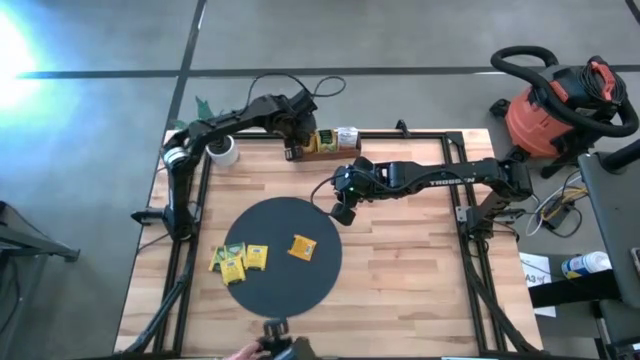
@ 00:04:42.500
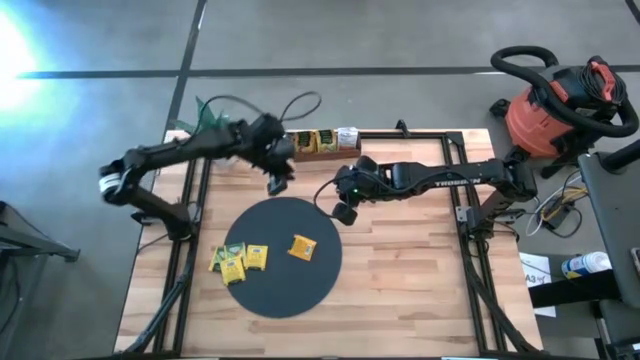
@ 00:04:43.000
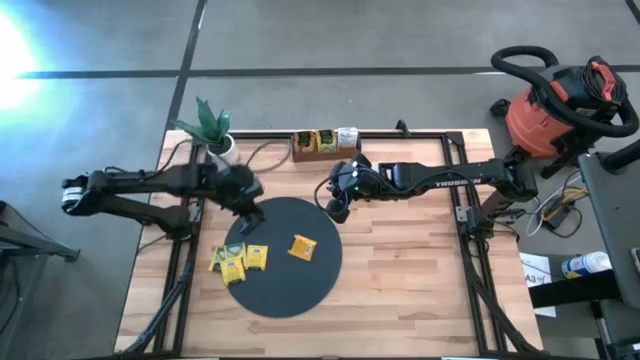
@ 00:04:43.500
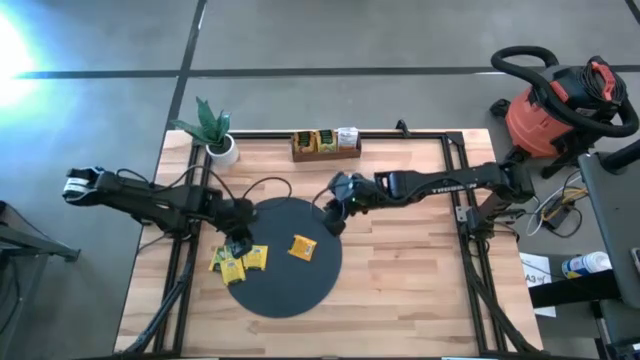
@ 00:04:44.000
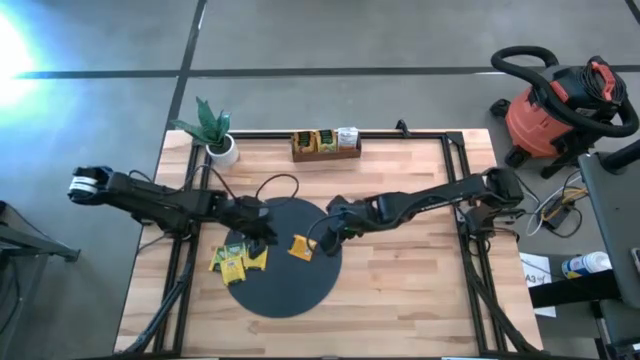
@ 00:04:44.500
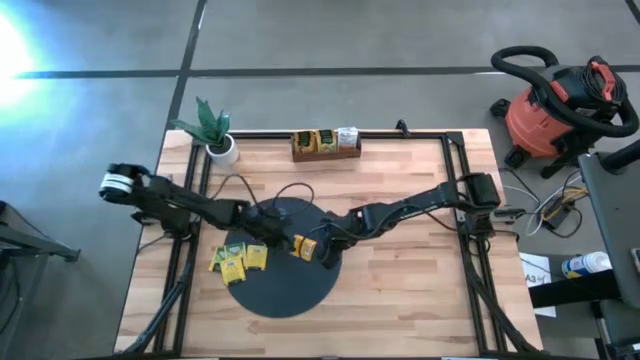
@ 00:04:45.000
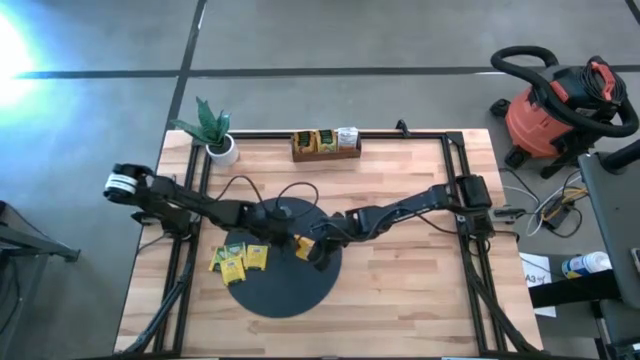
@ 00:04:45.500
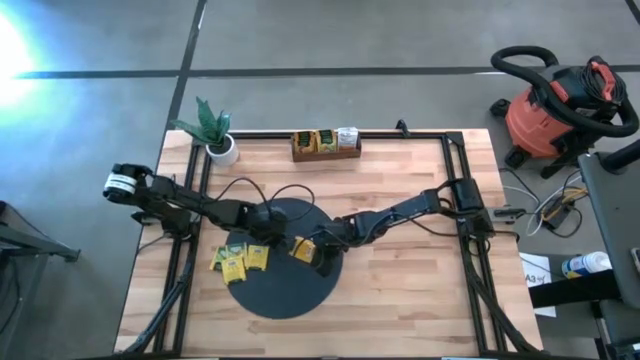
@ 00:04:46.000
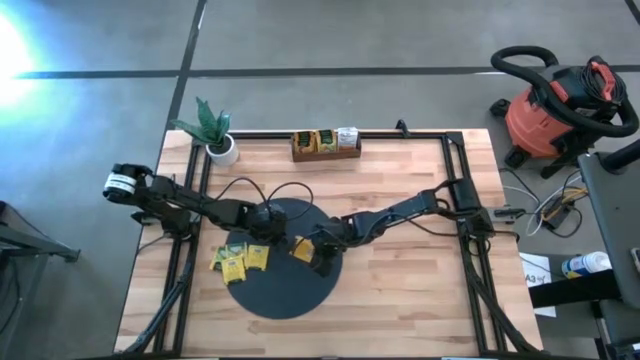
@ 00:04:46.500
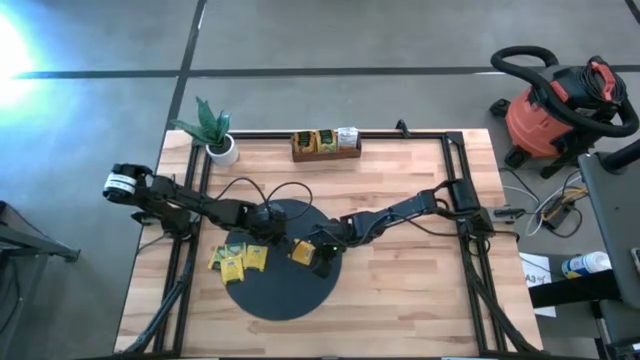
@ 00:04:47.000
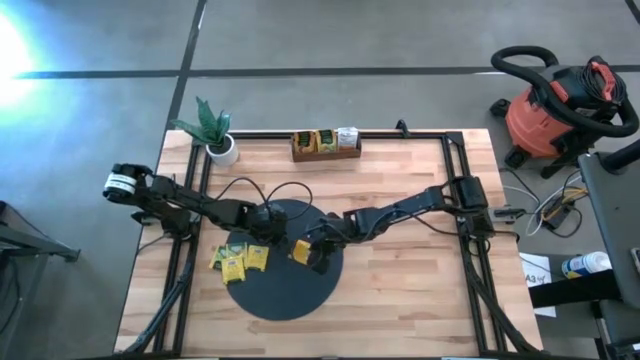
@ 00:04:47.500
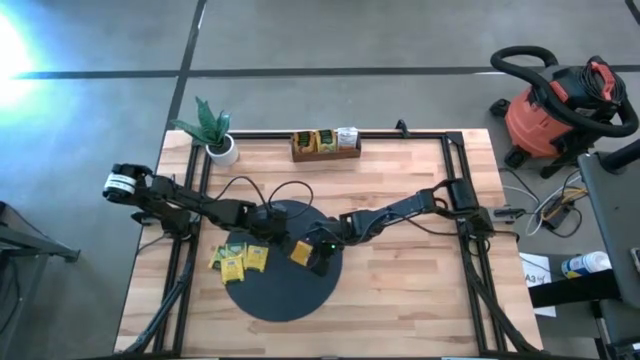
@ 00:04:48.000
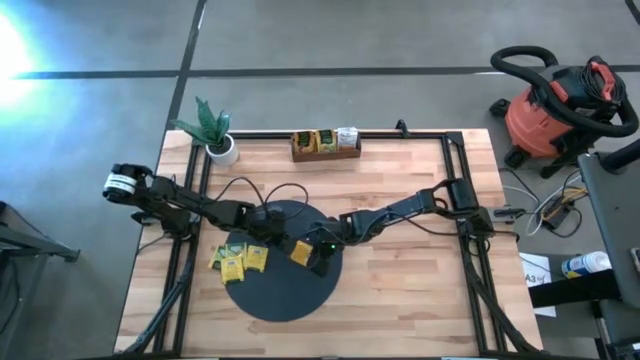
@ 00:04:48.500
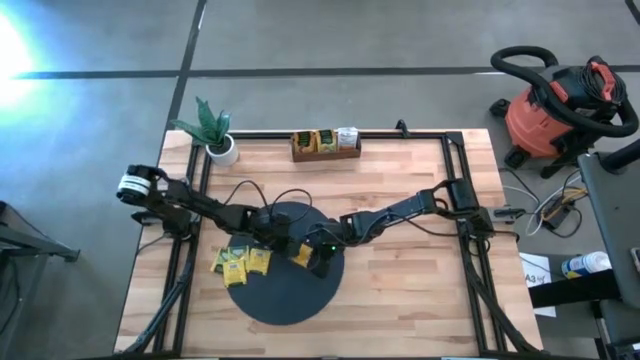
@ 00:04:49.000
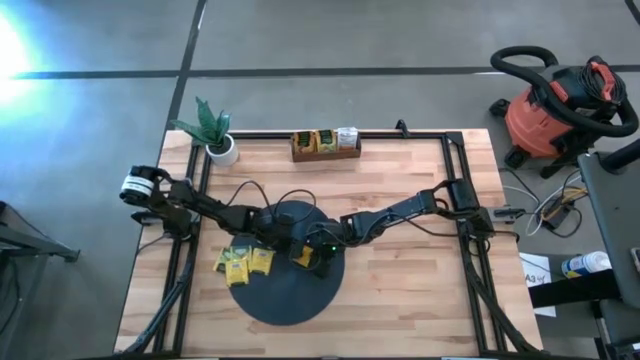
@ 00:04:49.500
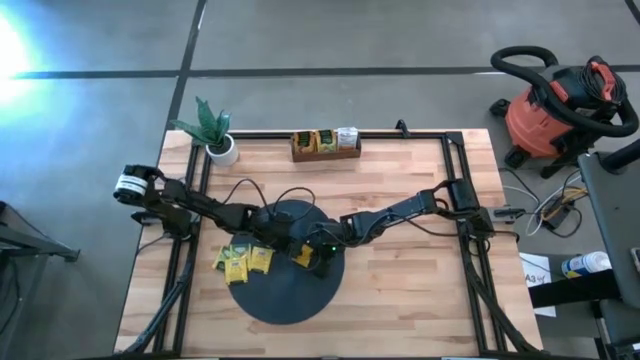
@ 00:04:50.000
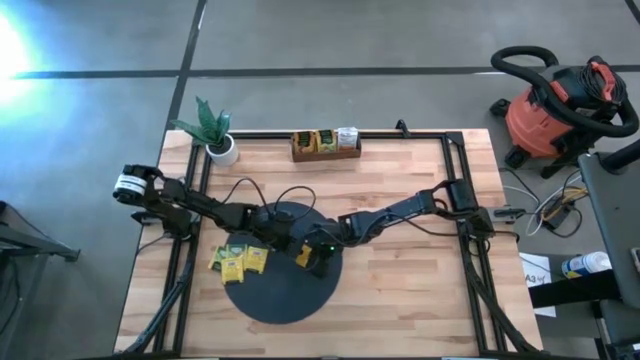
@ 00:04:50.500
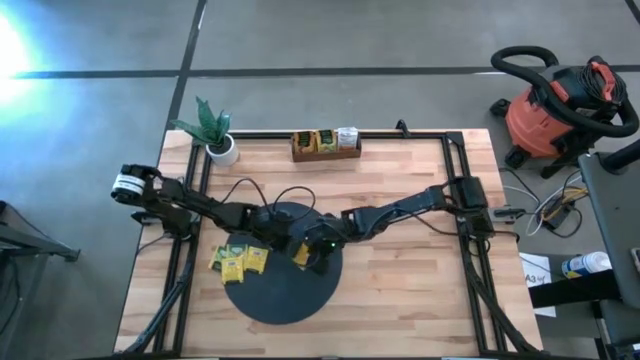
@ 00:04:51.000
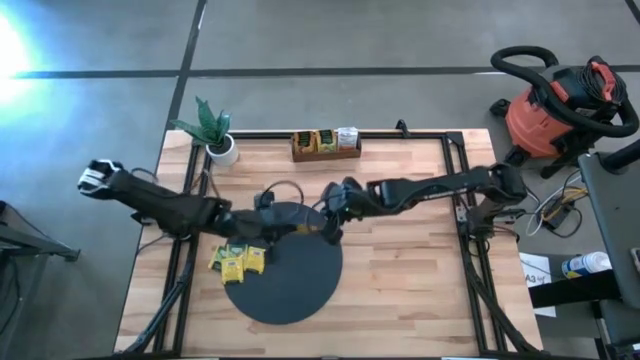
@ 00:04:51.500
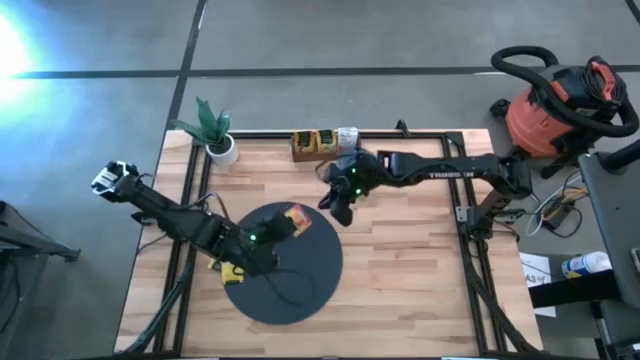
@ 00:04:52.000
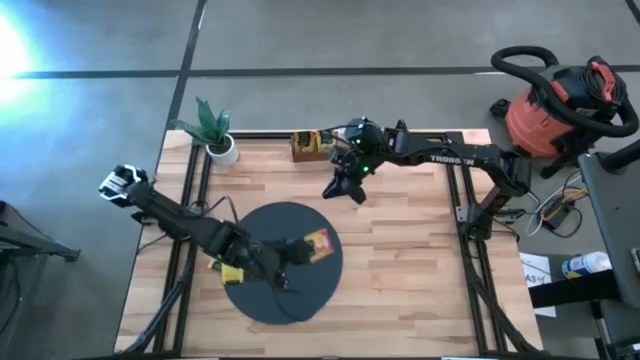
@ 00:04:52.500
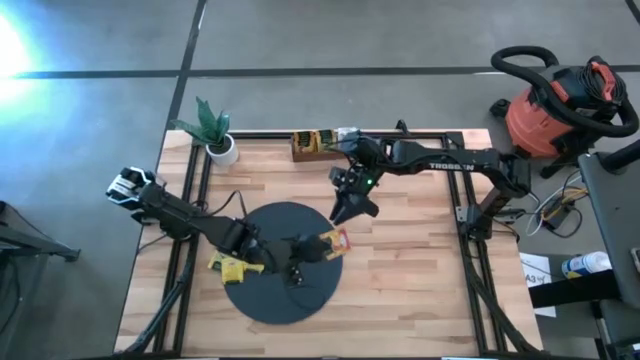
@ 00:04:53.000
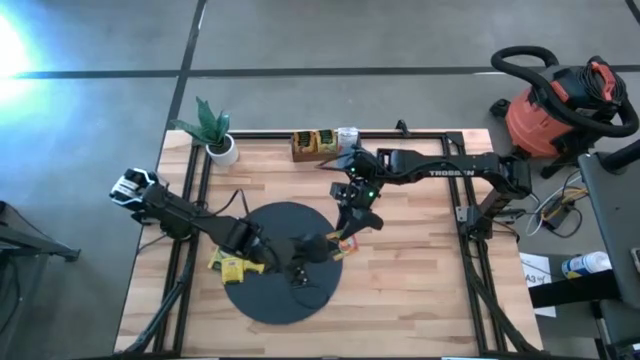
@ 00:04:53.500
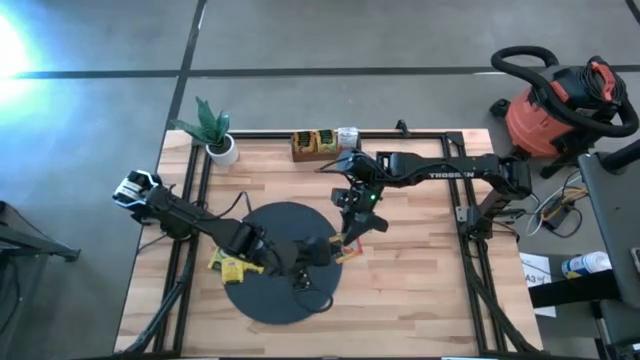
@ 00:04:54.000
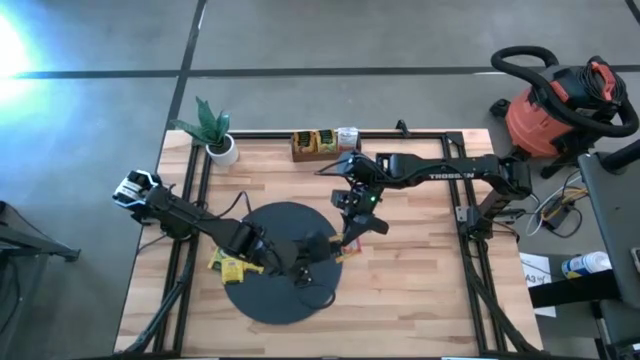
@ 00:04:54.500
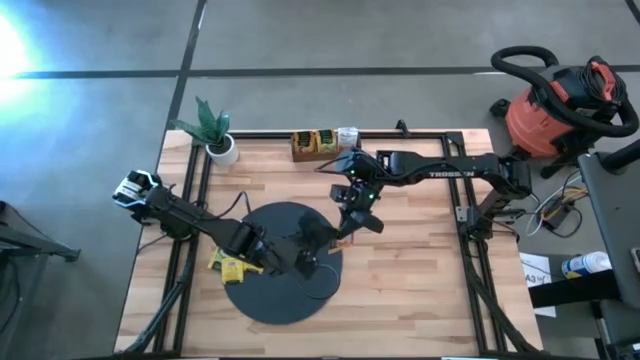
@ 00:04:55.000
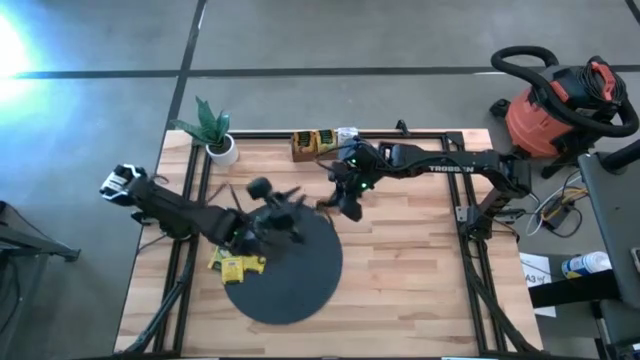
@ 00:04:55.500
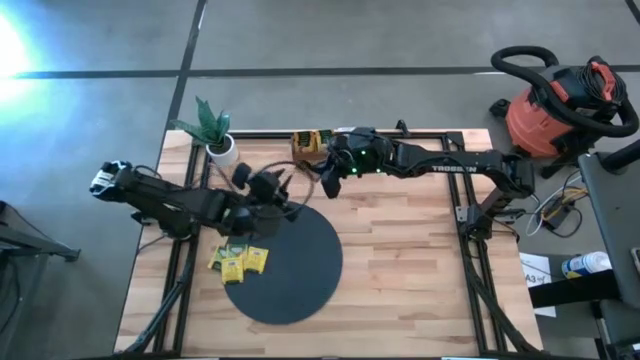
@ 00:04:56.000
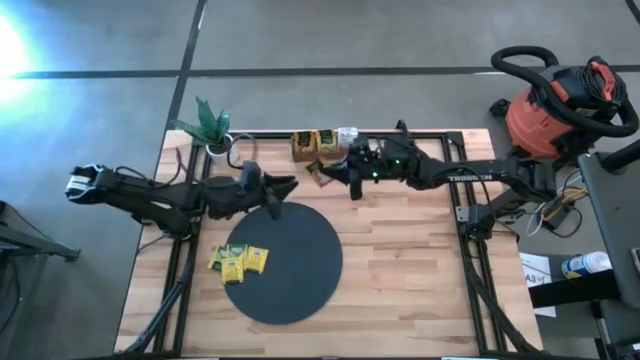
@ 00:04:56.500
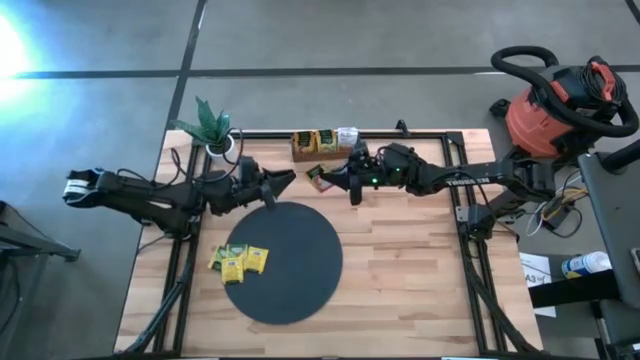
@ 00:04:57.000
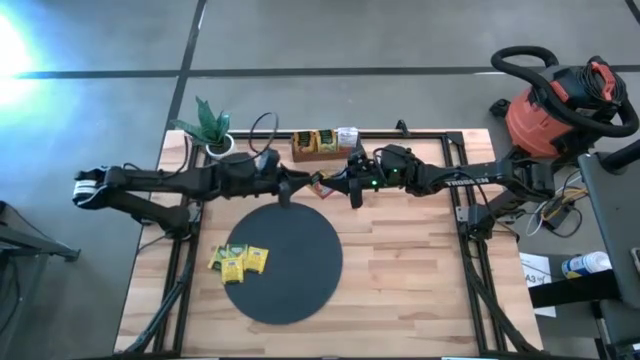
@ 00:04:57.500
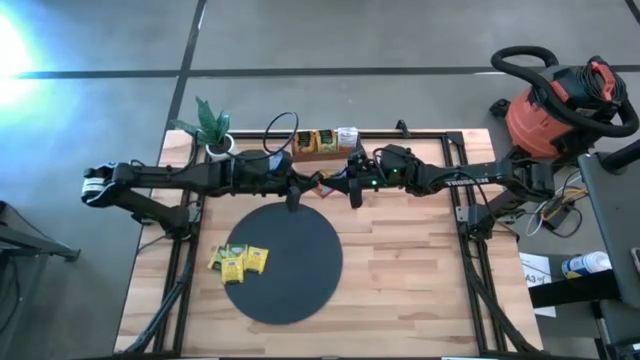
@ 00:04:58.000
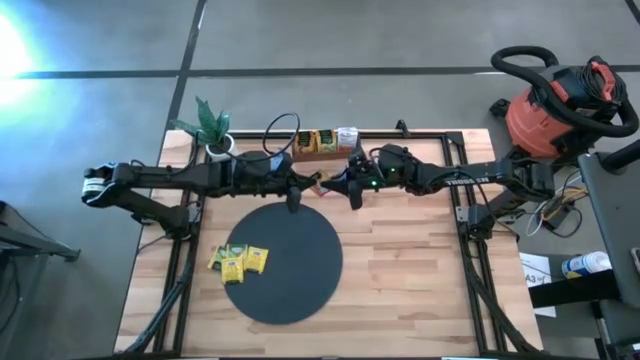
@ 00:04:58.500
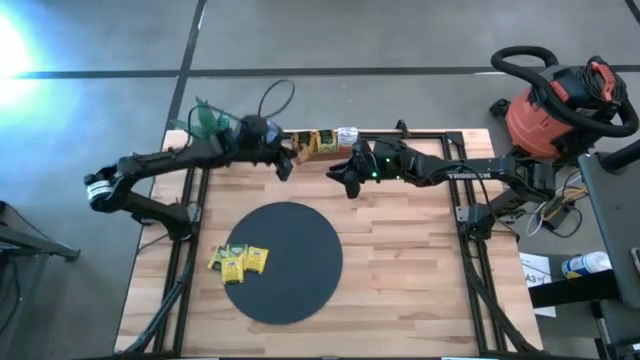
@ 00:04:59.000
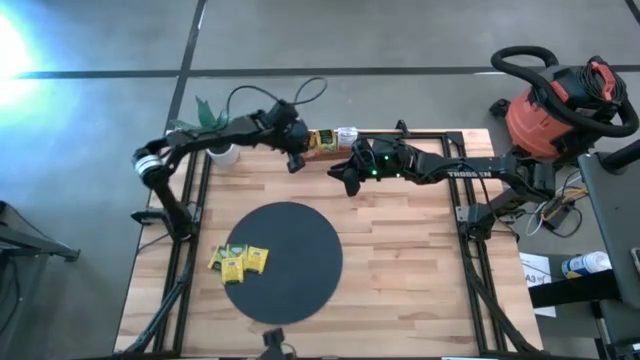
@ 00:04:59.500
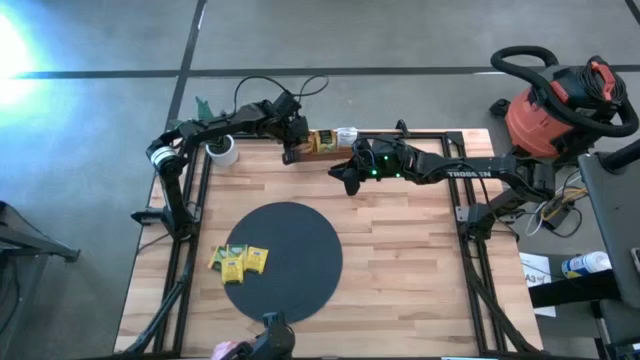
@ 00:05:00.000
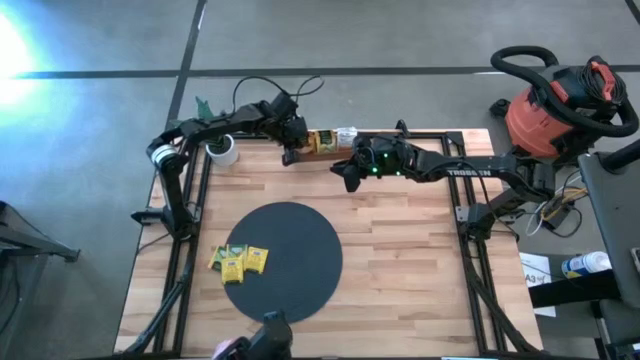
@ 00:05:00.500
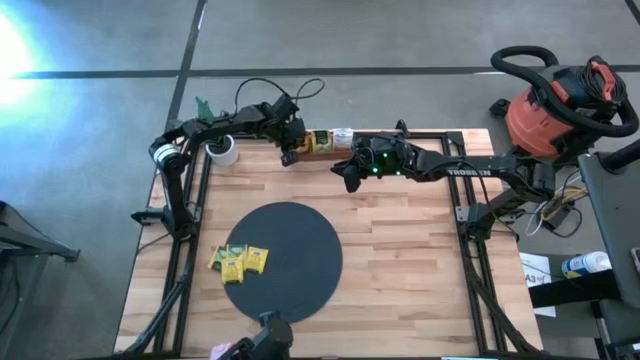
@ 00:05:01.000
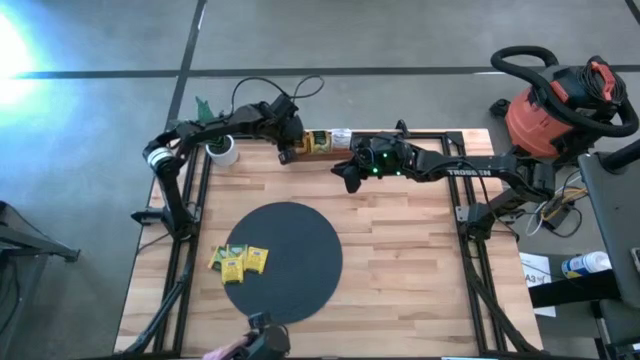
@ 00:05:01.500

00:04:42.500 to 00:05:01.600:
Task: Pick & Place Tea
Put the orange tea bag into the left section of the wooden organizer
